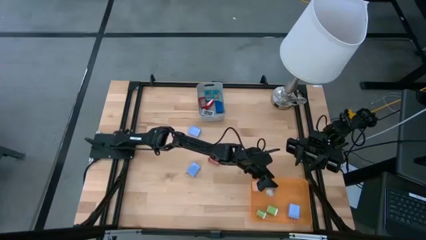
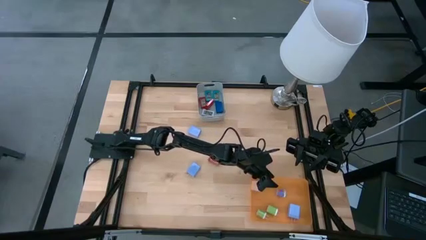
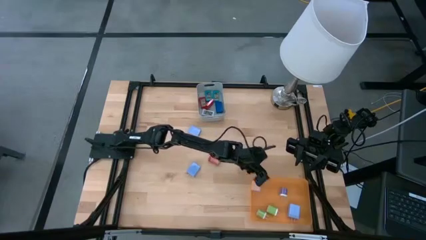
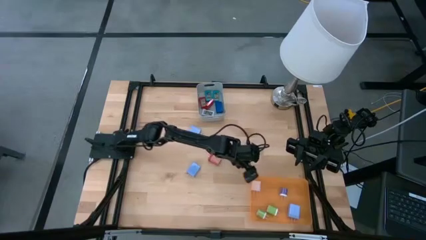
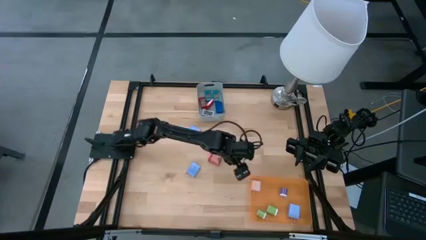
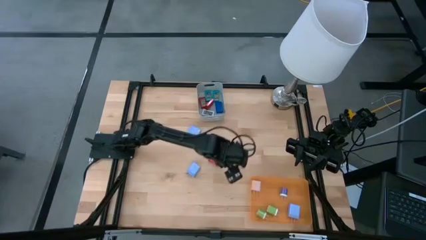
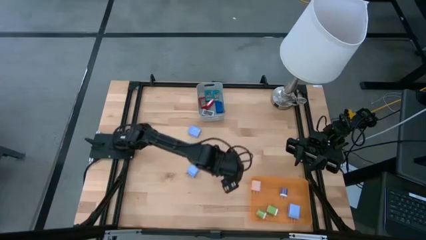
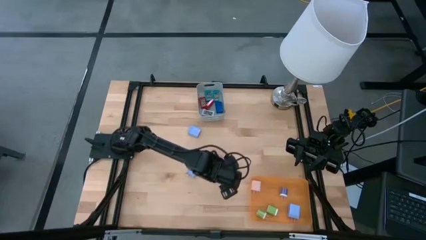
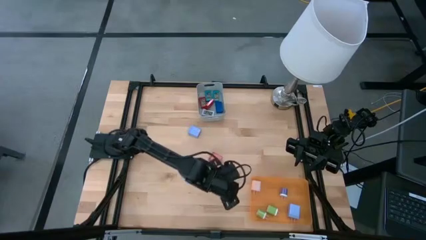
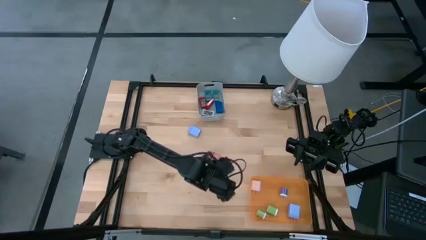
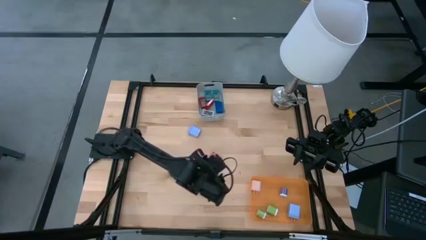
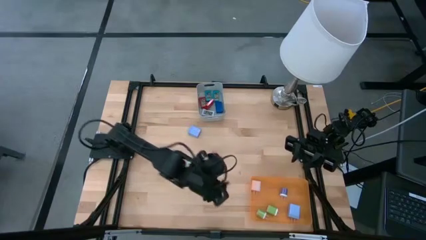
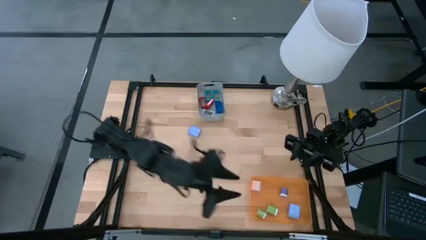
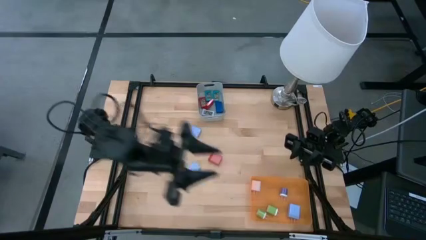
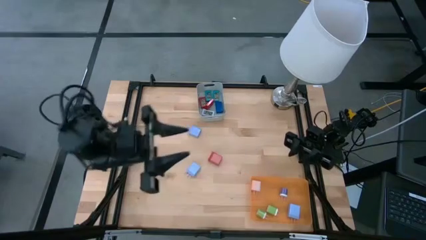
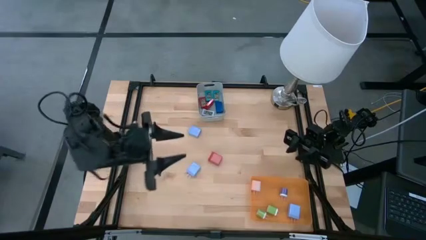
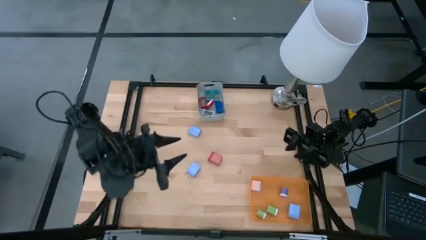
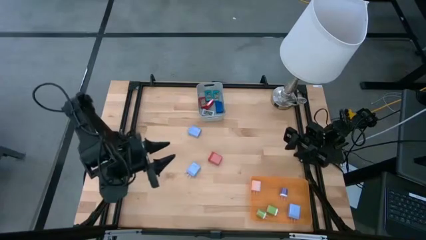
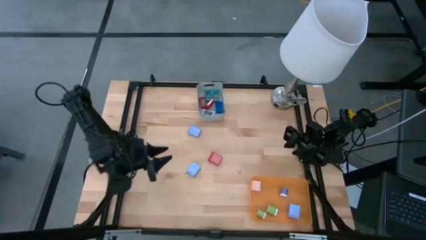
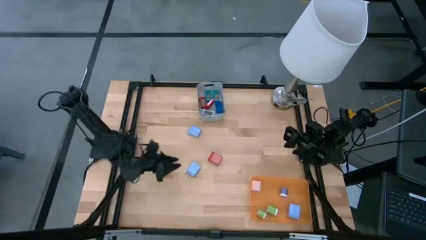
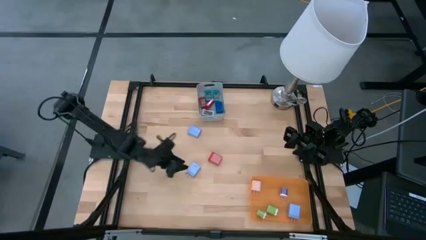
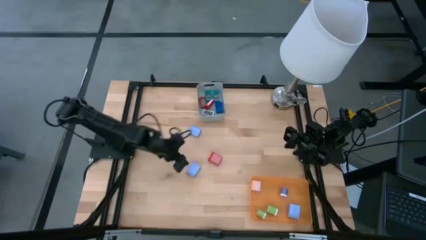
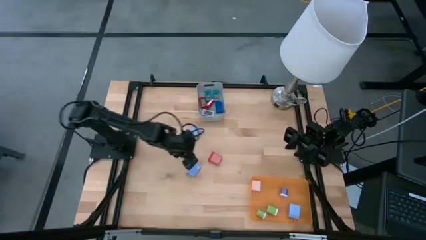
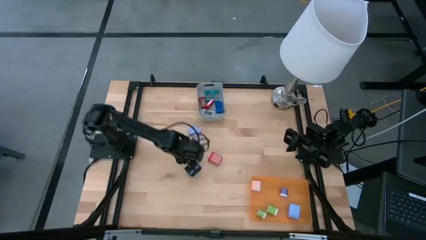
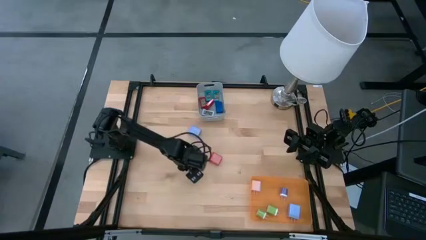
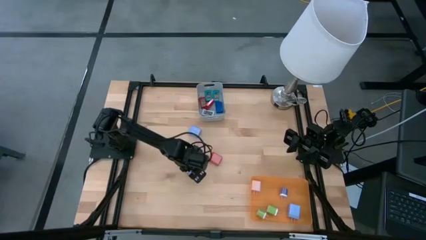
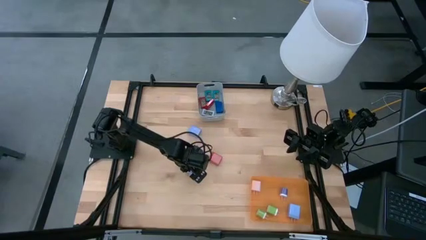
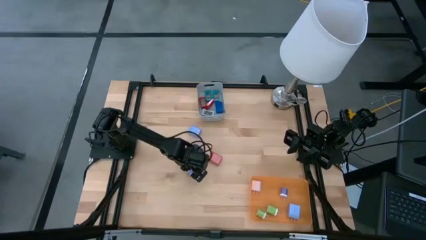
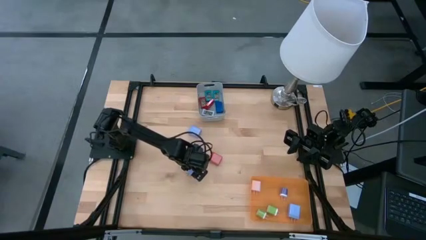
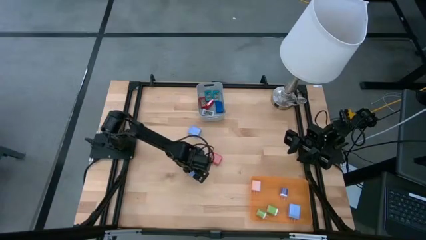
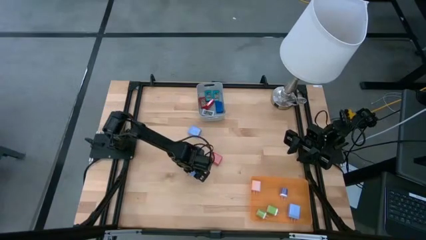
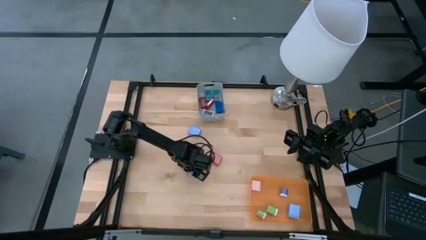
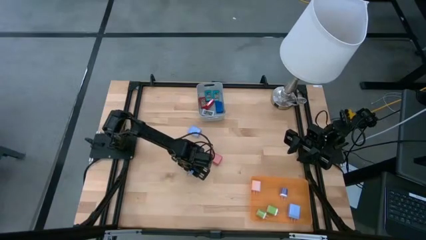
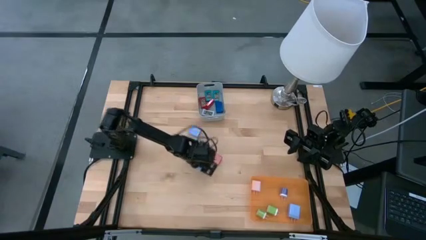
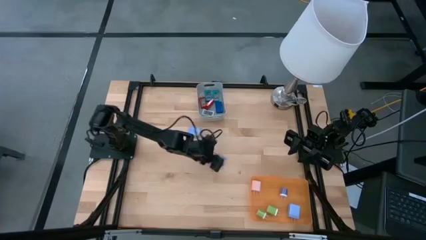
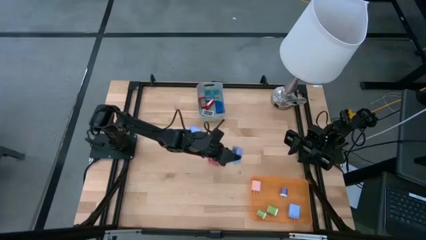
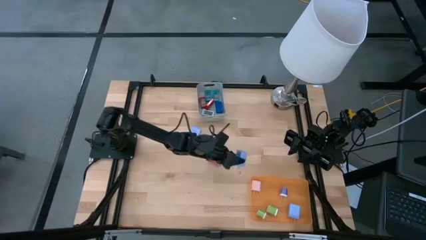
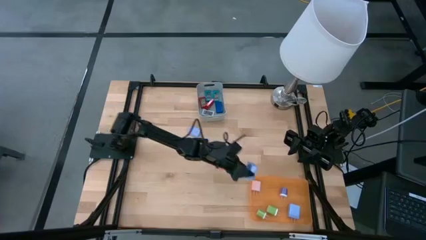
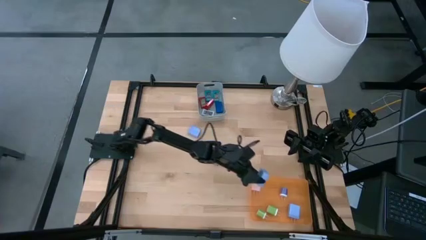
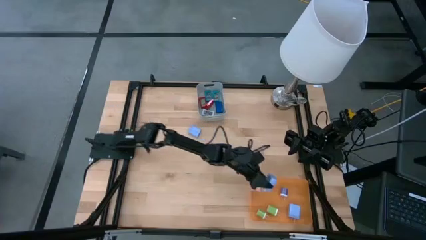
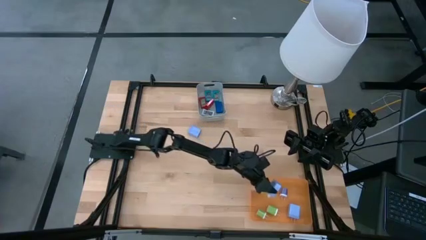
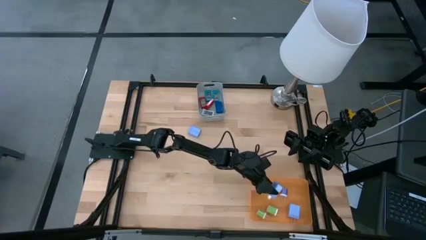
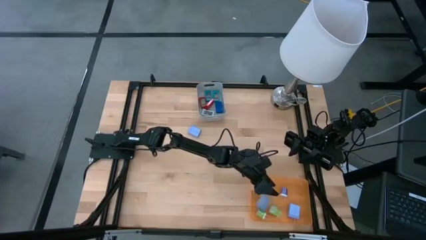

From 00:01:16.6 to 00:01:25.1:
Task: Pick & Place Office items
Put the bottom light blue charger adapter into the orange bin

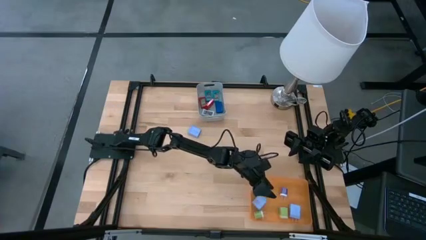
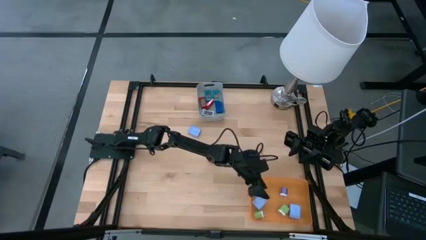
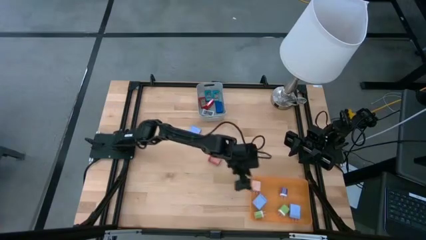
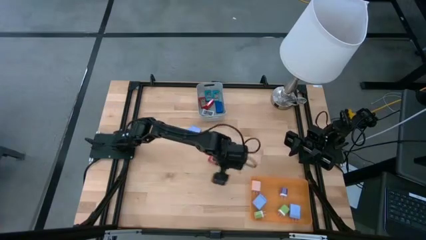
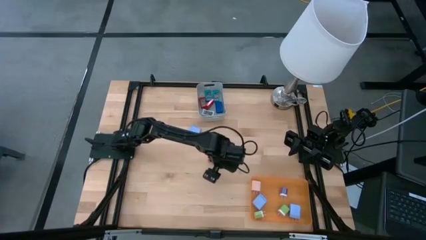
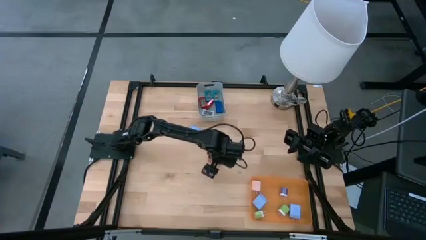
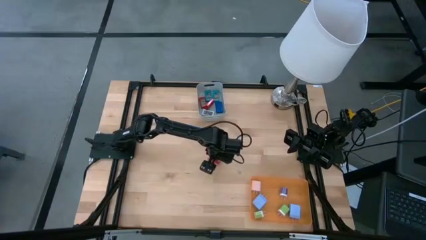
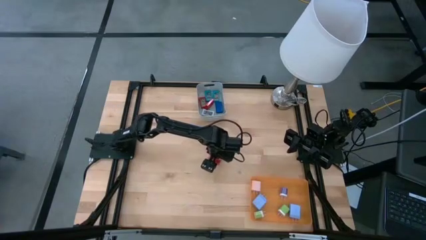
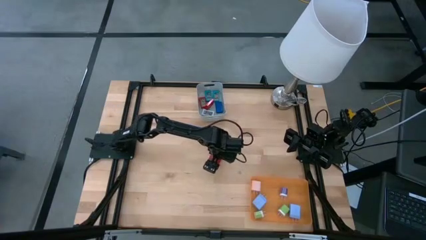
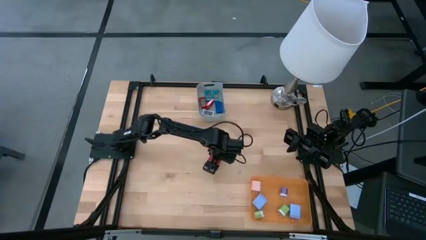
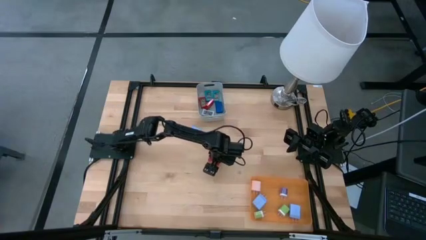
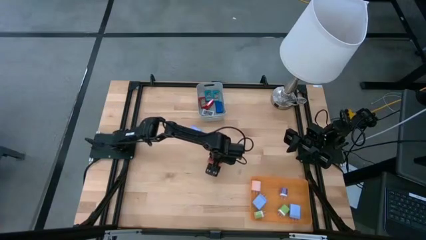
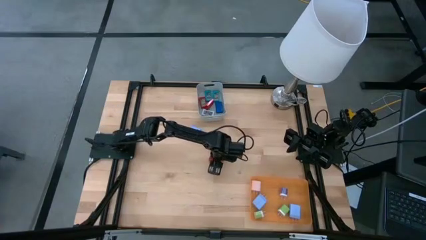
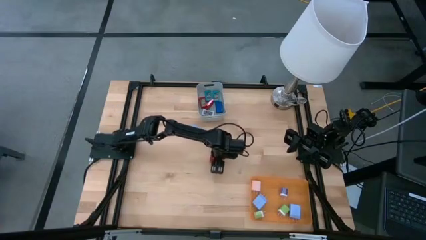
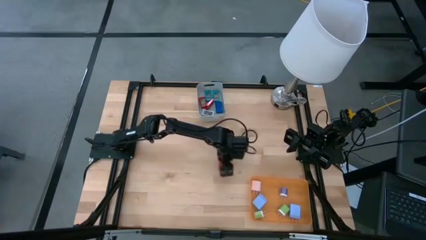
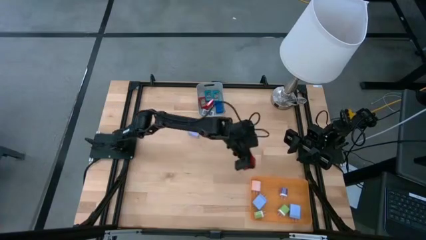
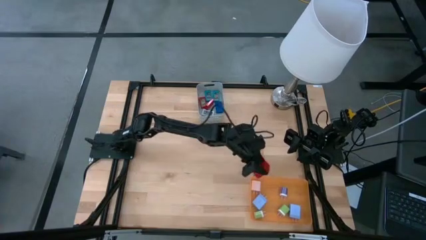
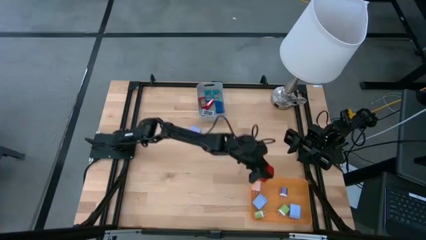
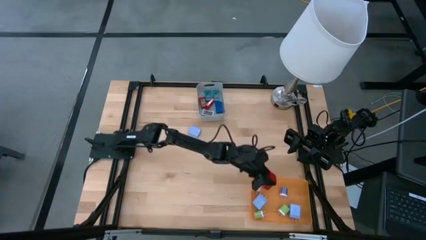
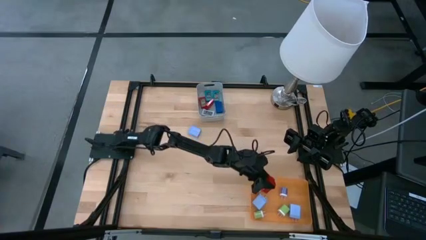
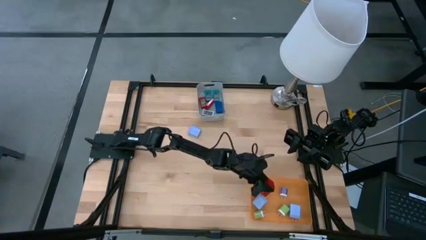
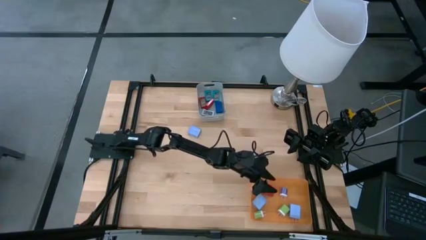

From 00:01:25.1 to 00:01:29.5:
Put the red charger adapter into the orange bin

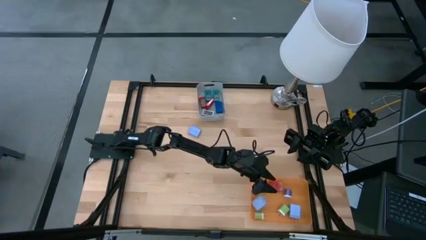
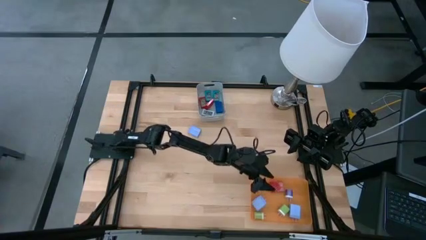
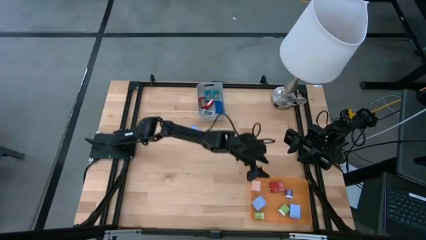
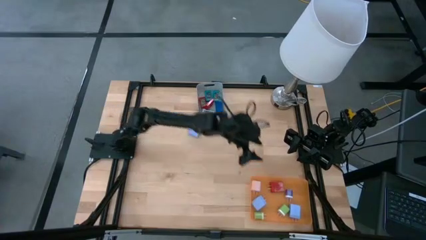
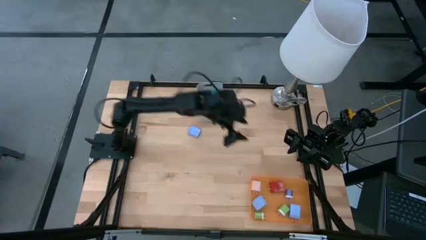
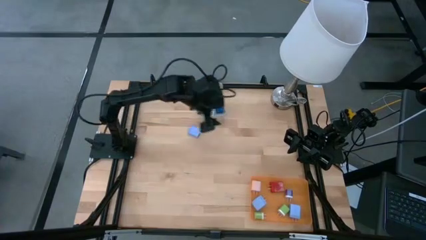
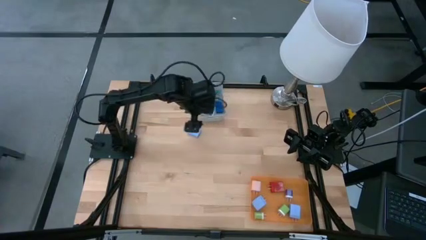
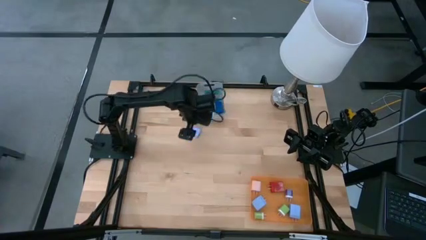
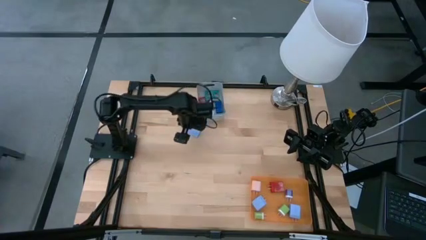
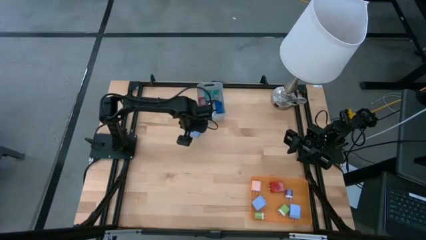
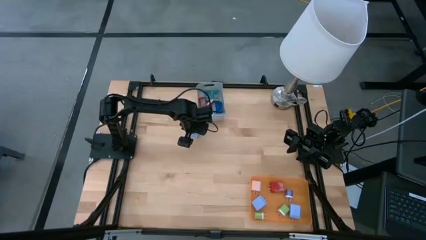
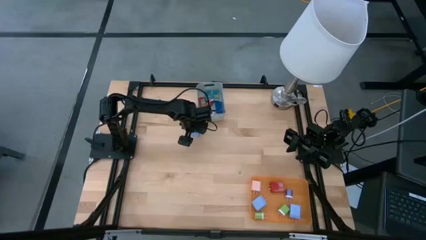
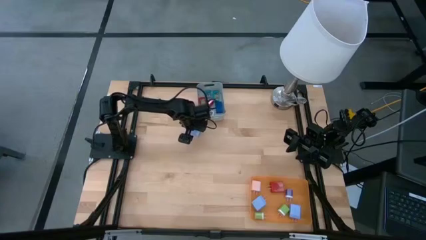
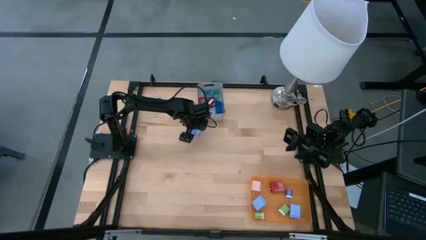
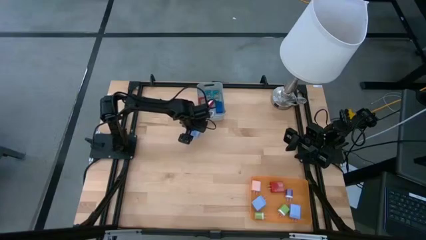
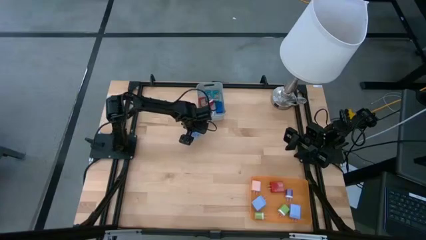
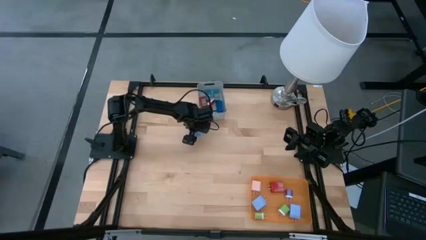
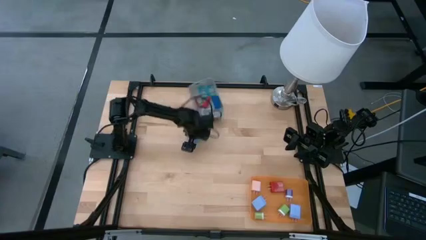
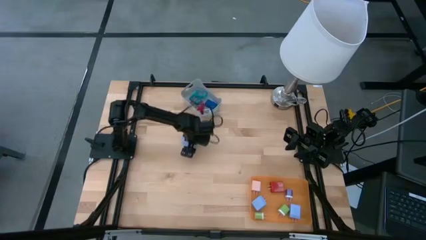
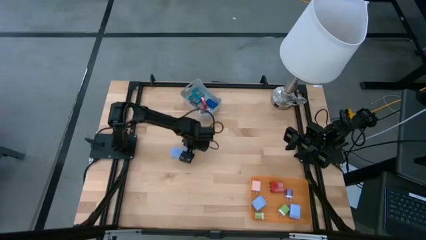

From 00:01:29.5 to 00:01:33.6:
Put the light blue charger adapter into the orange bin
